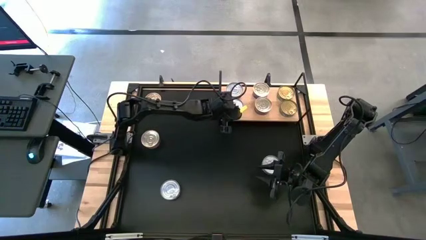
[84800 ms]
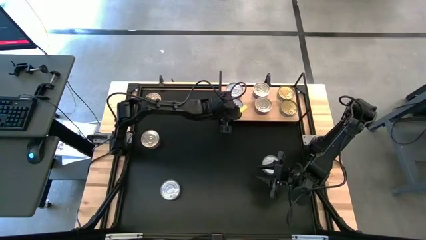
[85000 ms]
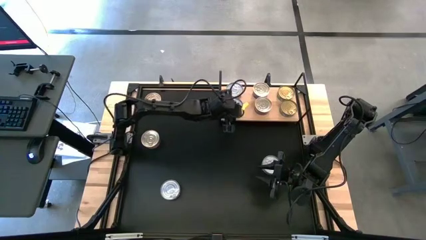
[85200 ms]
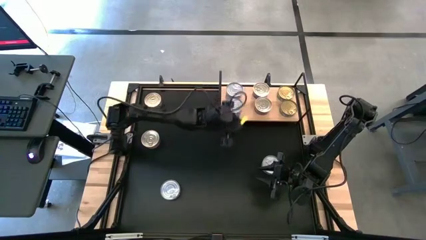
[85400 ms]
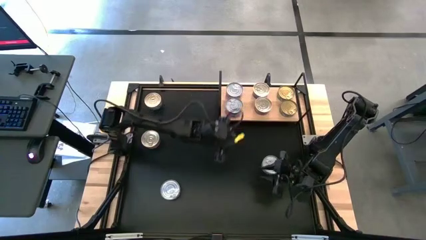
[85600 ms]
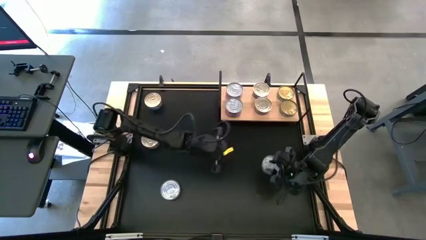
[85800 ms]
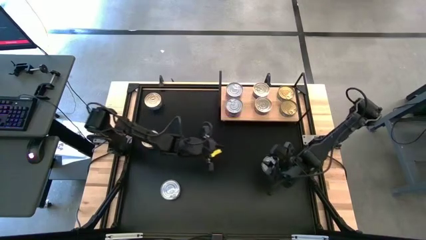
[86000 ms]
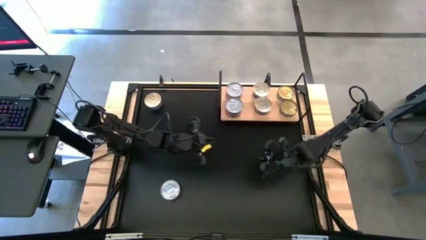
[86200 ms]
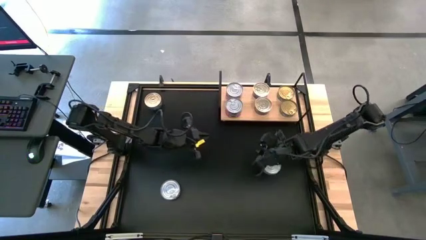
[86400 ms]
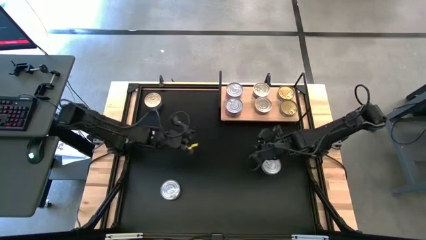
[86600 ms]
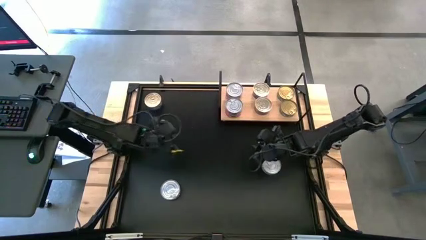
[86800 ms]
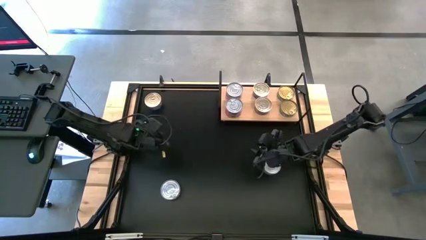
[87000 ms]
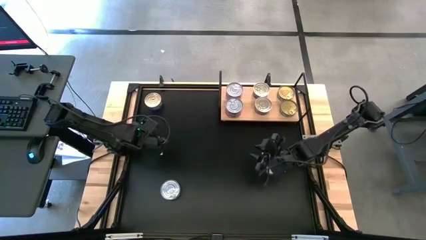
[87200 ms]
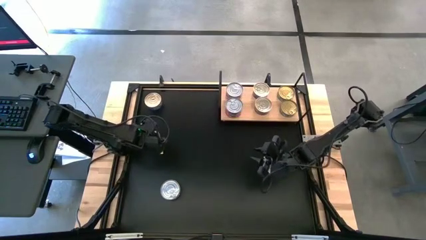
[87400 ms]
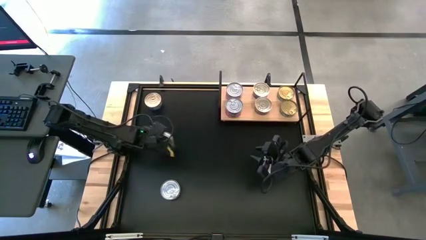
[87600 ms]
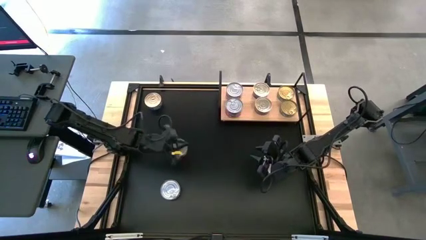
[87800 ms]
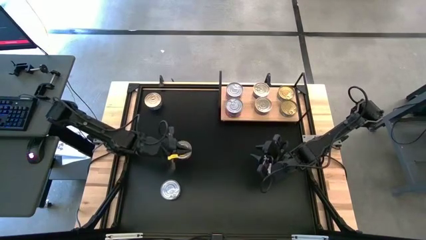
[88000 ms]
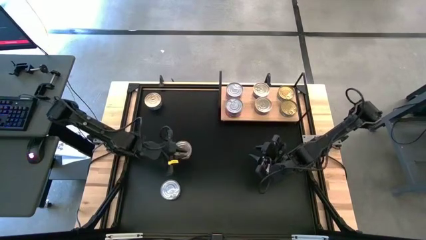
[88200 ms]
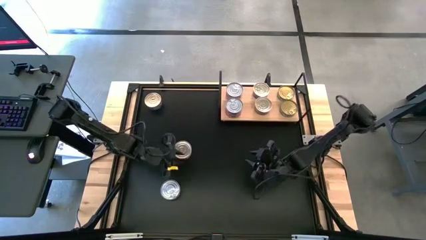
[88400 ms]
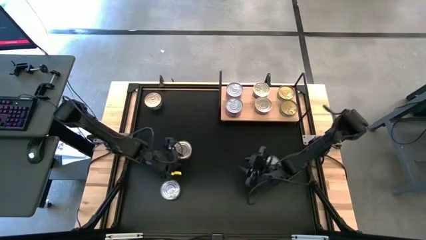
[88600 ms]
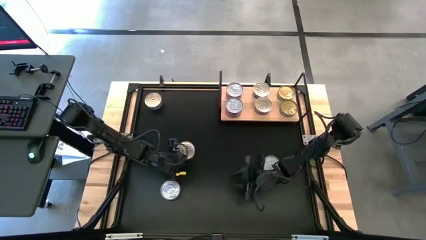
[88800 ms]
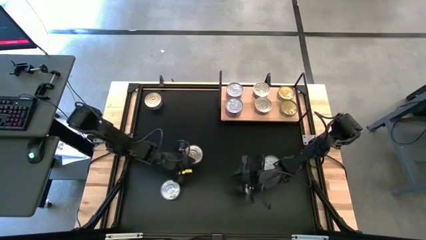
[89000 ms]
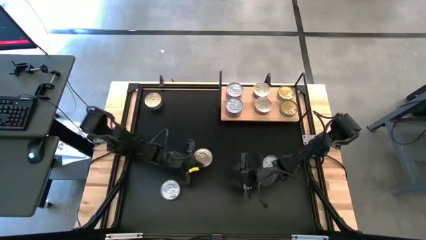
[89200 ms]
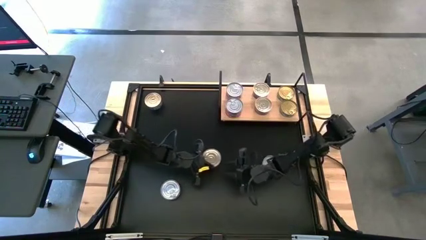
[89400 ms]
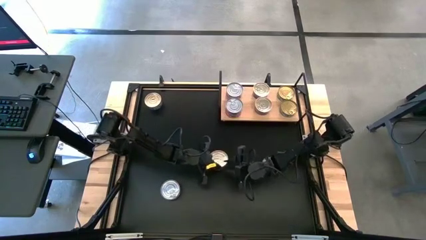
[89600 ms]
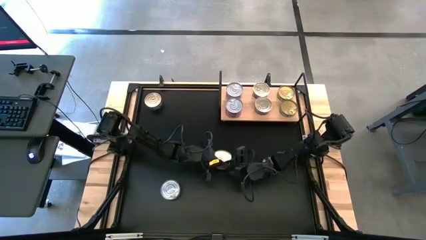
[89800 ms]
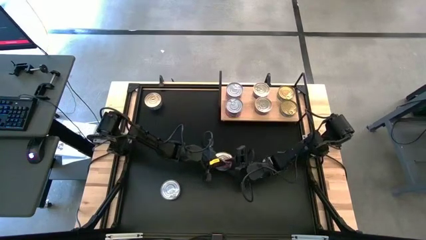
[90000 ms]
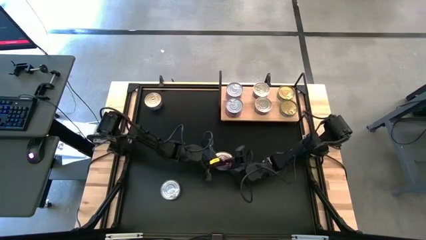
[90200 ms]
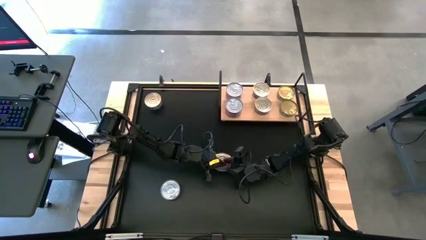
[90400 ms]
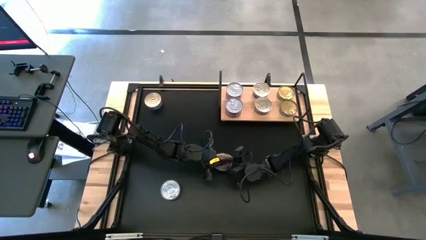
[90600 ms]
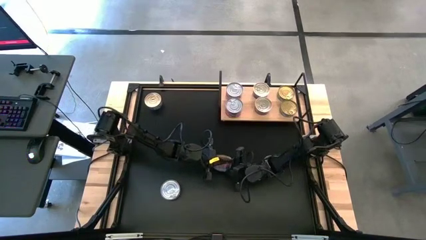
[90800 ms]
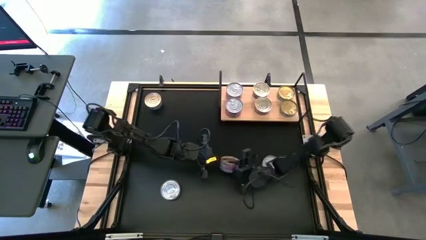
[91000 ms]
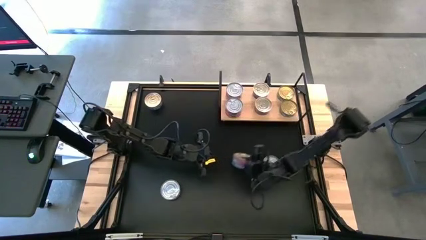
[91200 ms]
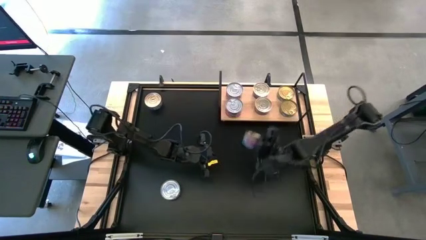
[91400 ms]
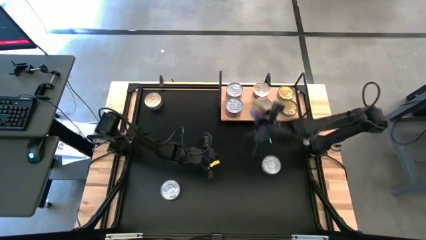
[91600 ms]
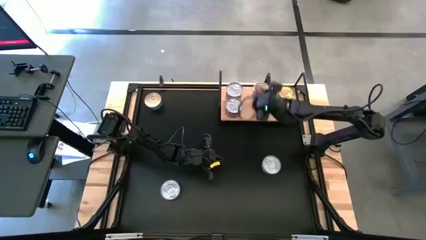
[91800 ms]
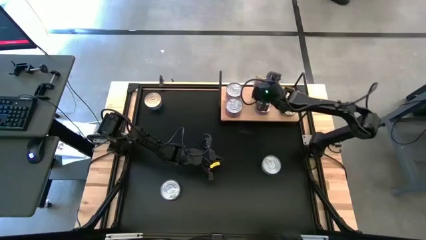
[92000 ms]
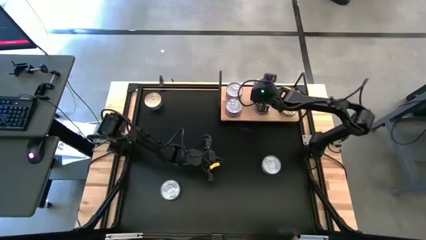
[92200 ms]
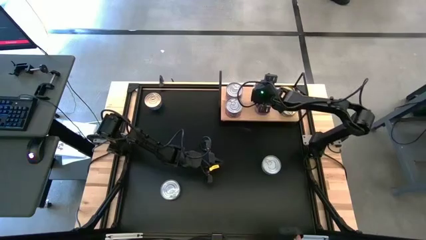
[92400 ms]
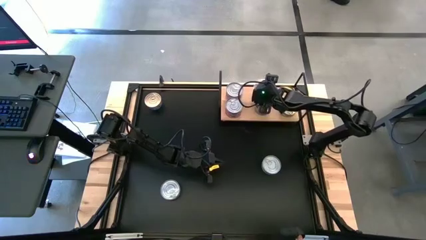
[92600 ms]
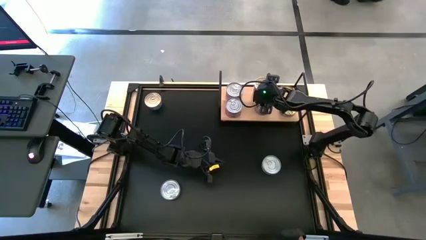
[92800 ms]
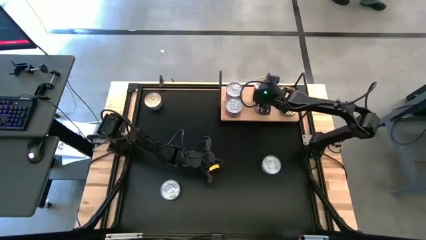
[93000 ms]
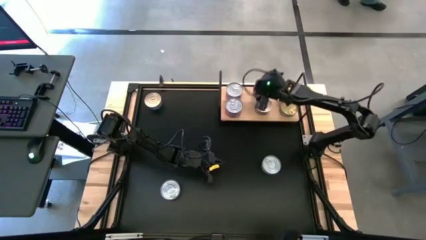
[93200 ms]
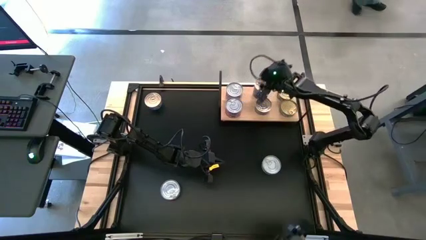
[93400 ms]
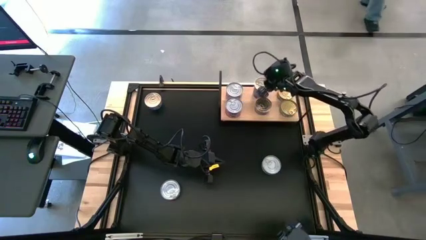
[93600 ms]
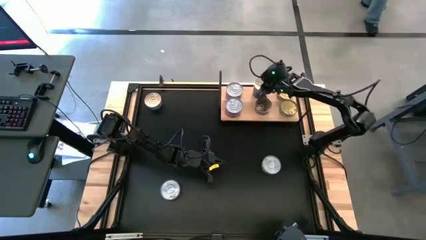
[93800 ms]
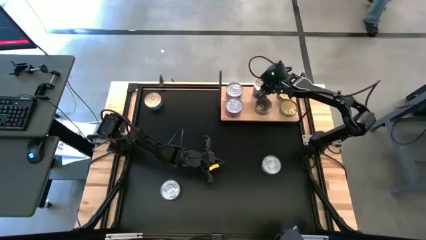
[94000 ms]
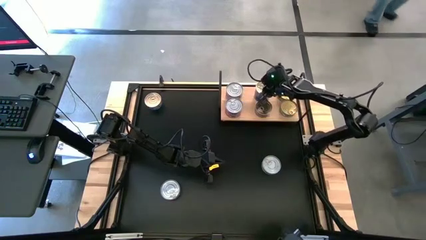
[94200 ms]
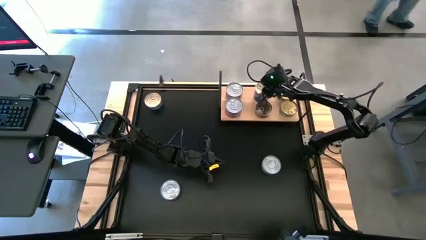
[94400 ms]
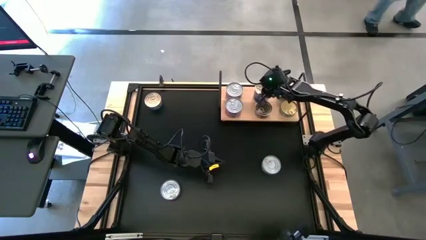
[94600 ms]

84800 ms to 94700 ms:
Task: Stack canned seafood by type on shelf
Stack the blue-pink tuna can on top of the other blue-pink tuna can on the shelf

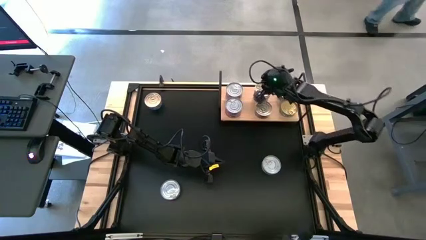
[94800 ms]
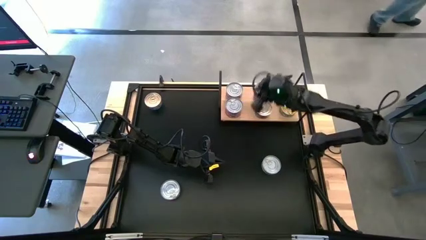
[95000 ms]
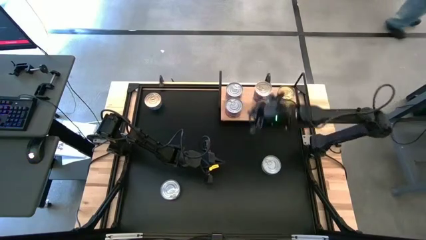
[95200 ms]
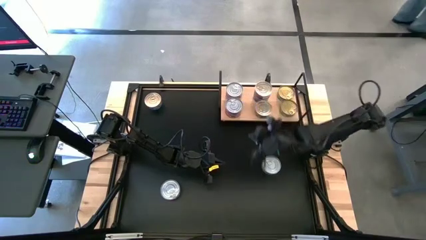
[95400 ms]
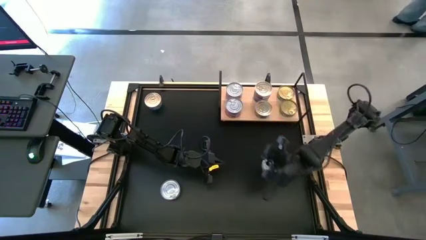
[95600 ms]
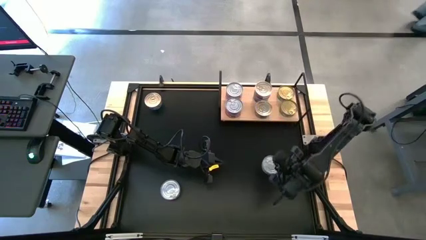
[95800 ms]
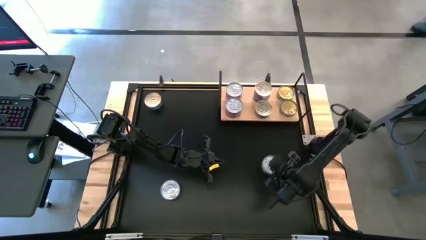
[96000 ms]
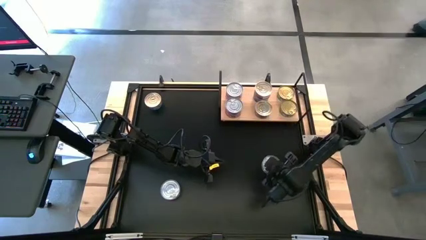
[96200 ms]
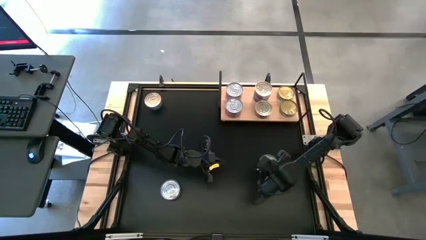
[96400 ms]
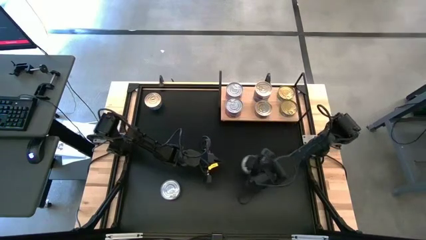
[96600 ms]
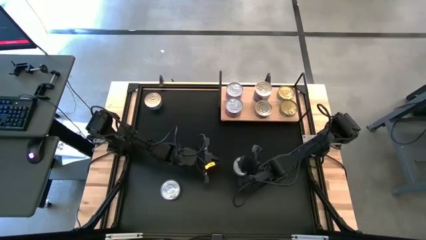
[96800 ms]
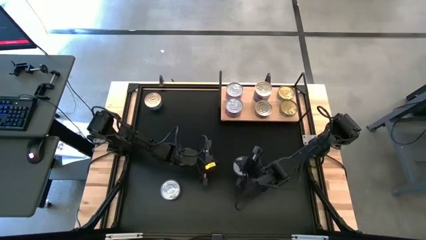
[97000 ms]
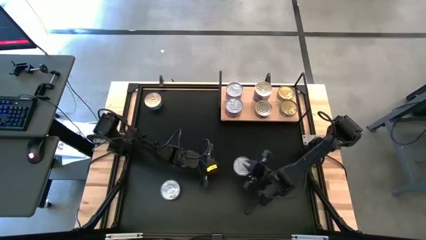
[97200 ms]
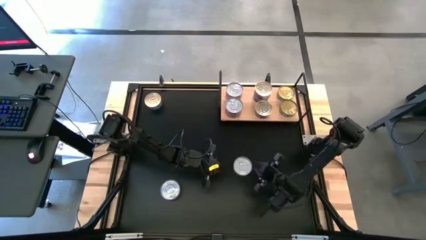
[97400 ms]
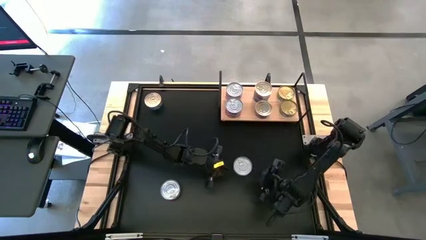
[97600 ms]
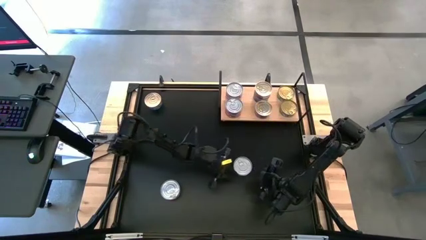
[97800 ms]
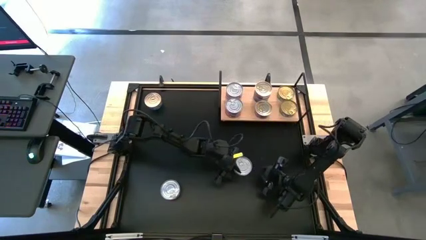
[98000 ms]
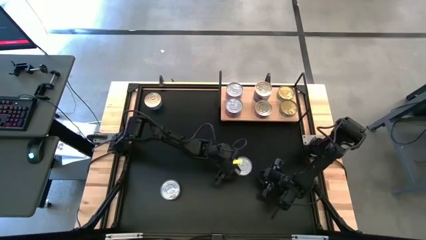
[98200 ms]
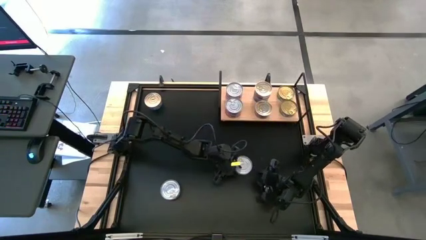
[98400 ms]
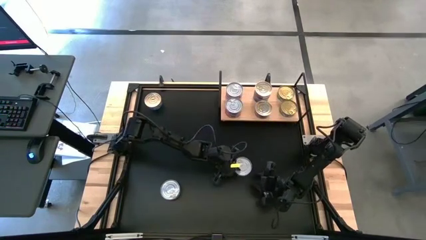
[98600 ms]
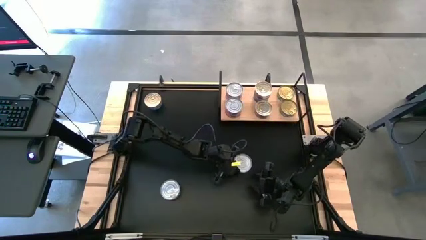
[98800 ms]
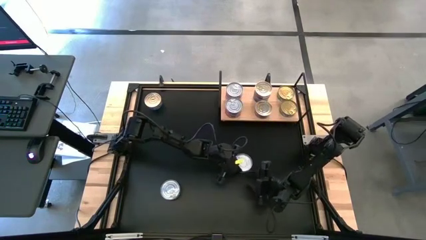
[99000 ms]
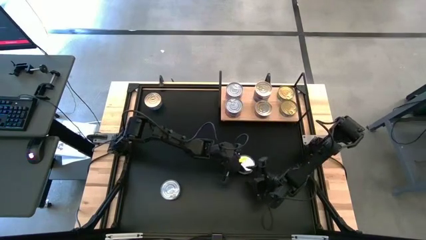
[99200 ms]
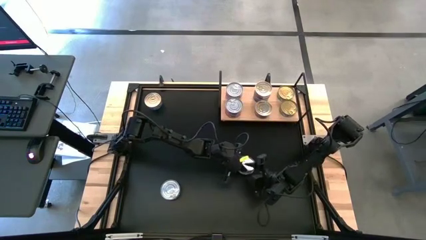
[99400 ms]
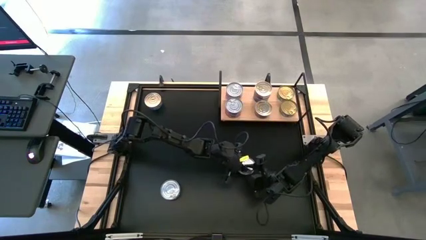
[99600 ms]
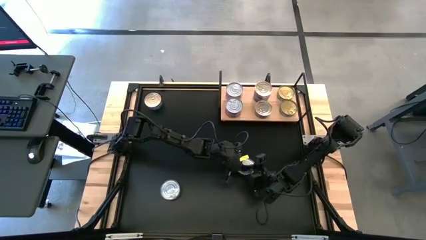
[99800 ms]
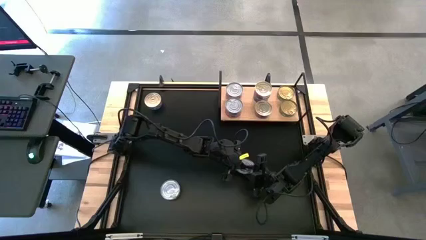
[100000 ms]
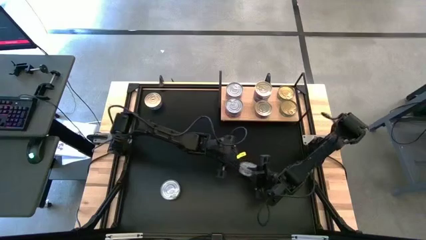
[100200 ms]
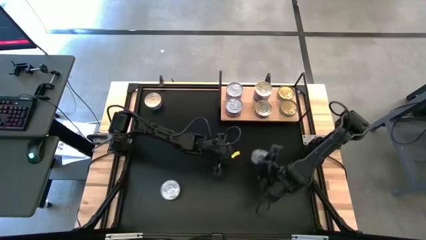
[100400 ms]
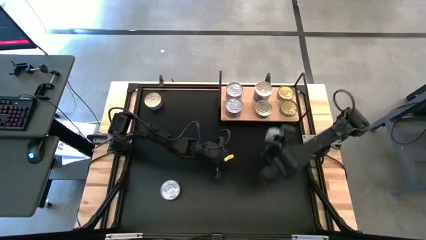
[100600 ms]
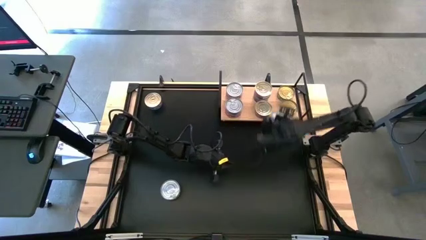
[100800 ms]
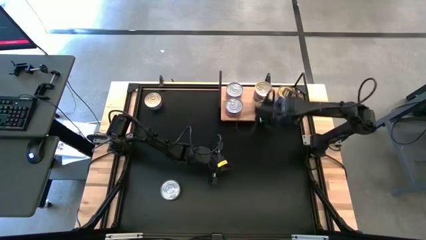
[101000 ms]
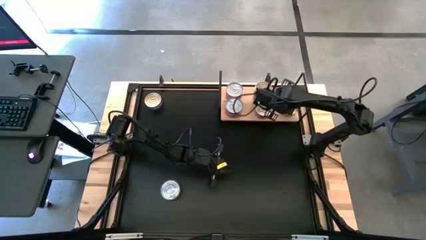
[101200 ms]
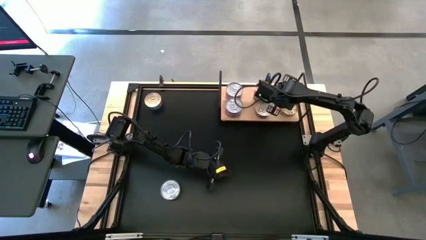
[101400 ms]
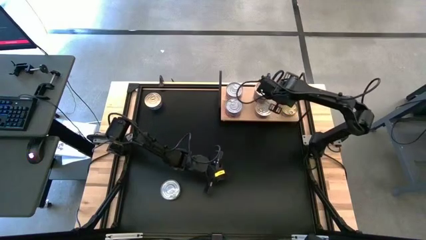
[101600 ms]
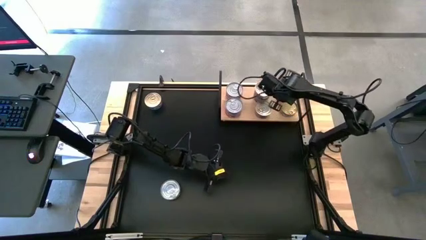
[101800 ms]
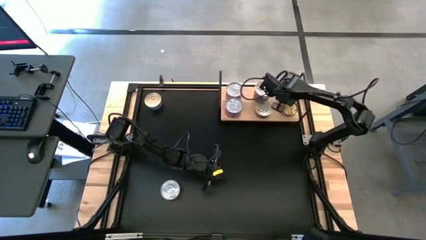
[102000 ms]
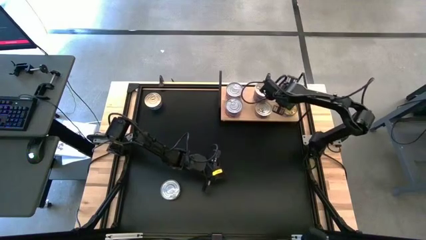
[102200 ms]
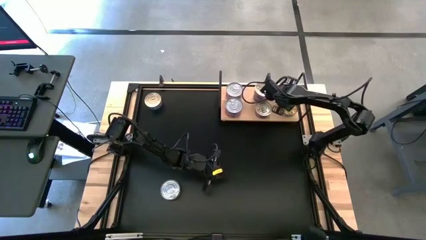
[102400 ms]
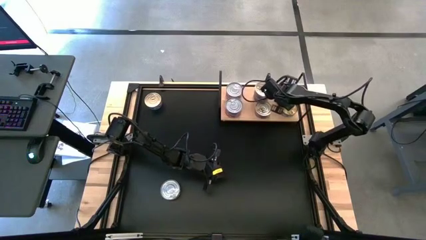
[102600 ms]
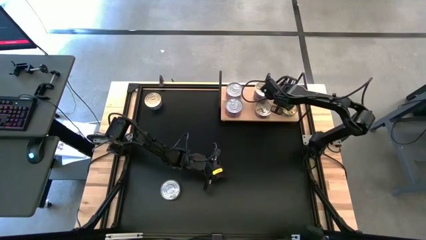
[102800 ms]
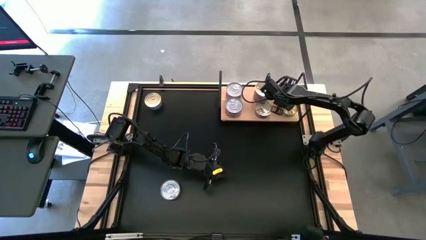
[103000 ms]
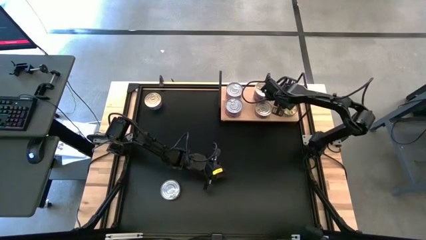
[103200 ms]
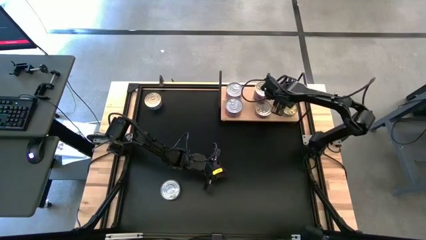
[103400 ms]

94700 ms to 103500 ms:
Stack the green tuna can on top of the other green tuna can on the shelf
